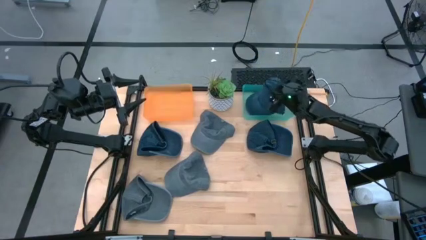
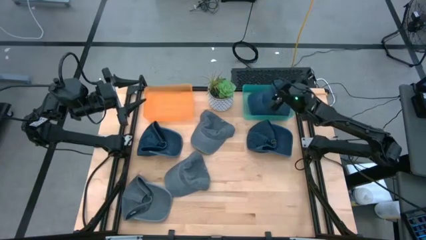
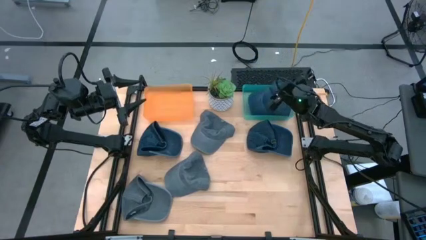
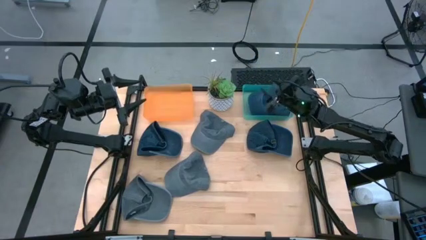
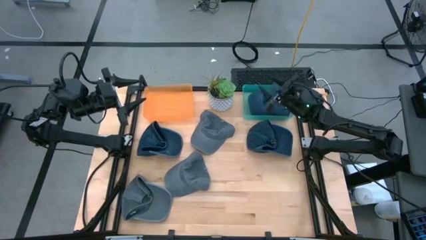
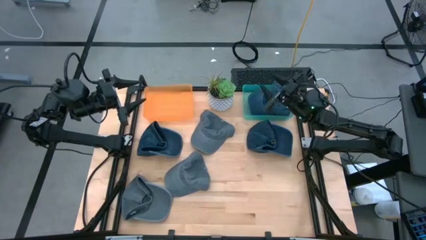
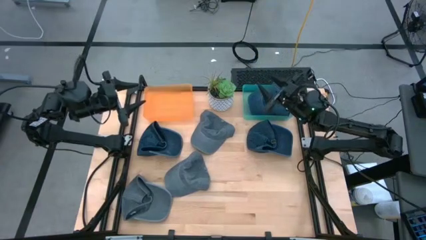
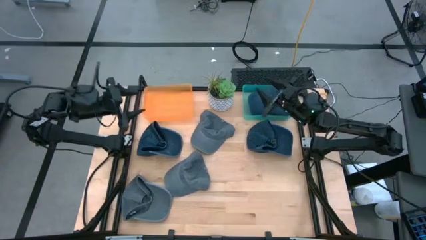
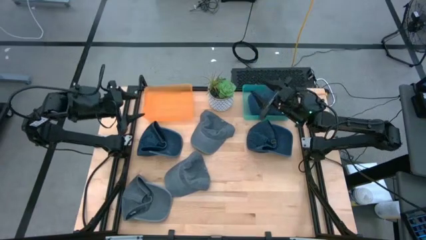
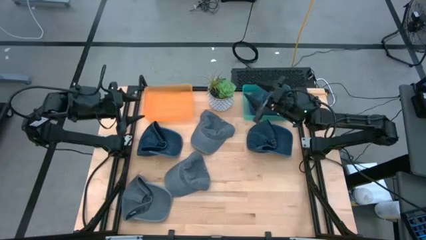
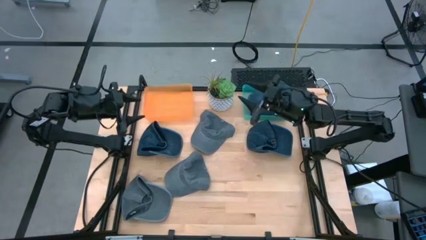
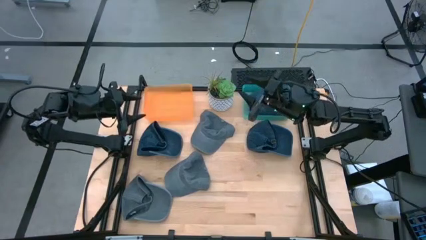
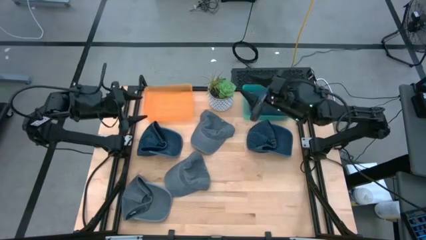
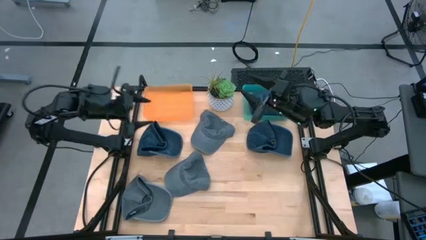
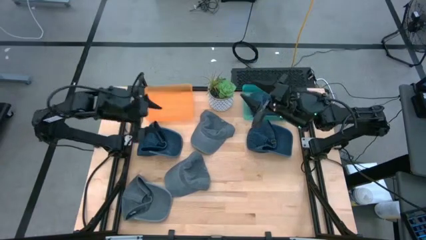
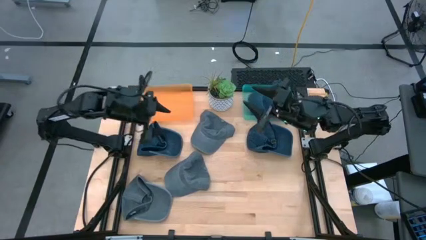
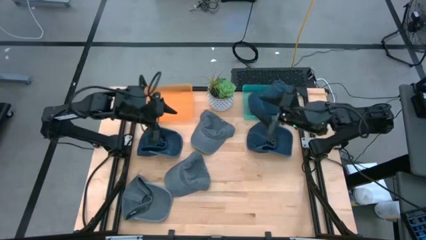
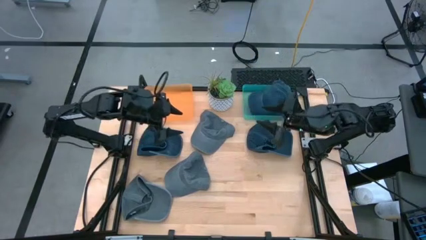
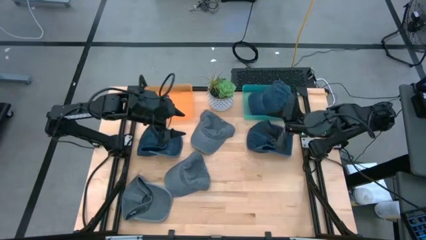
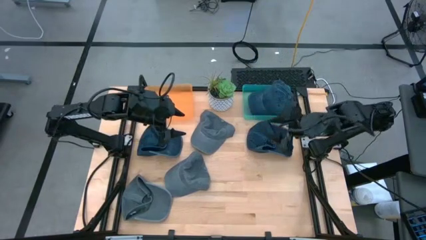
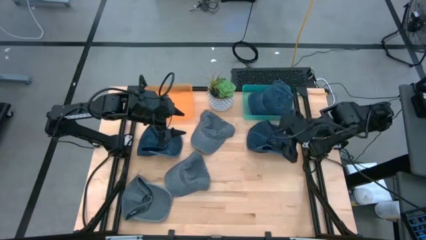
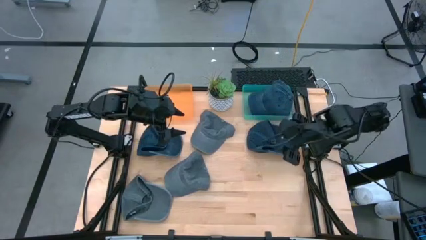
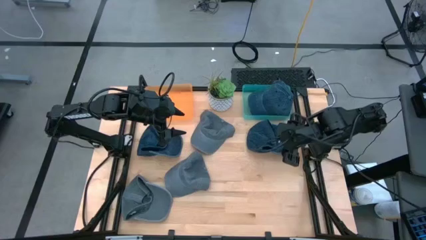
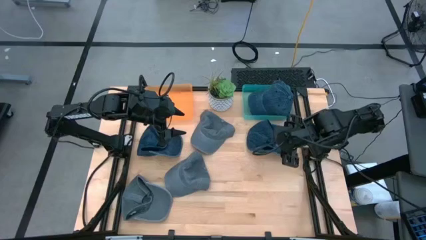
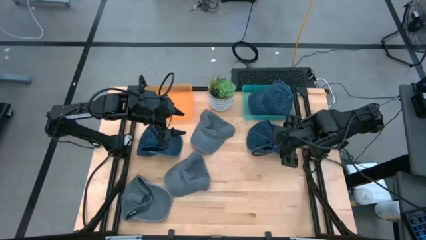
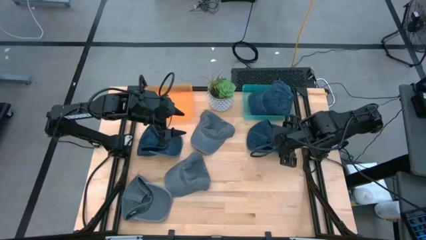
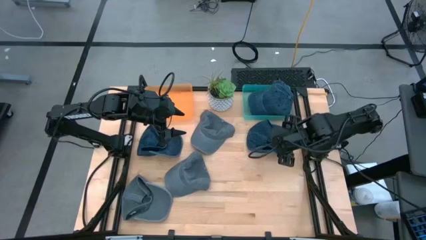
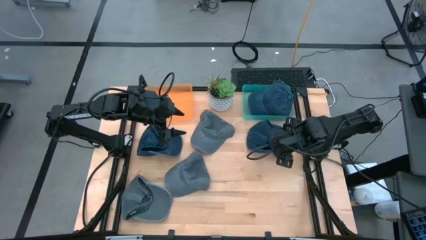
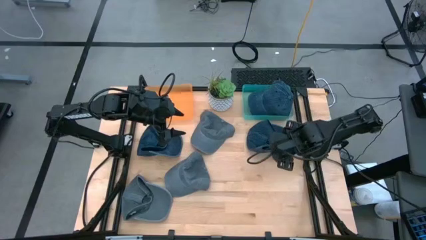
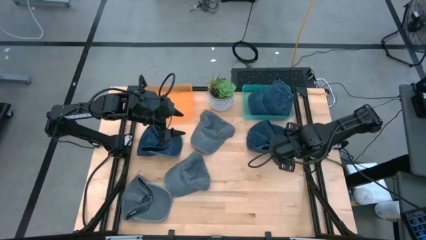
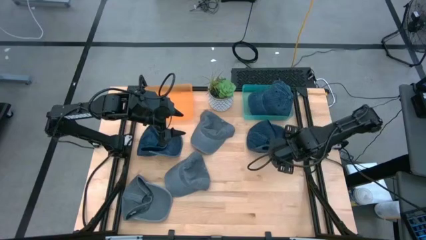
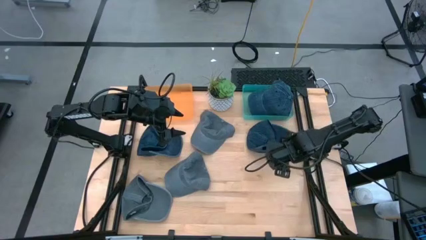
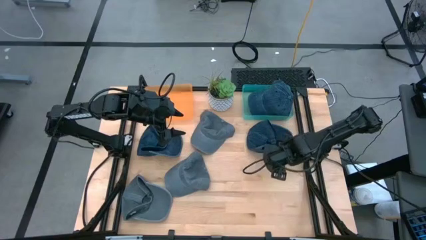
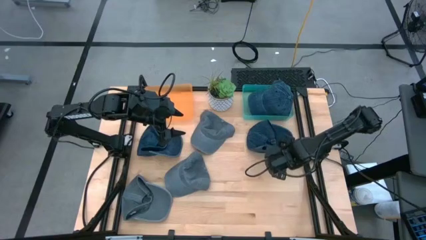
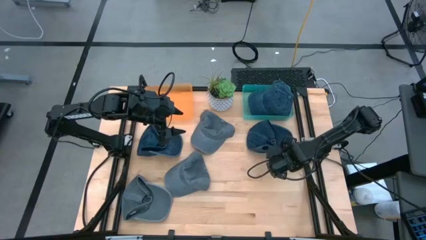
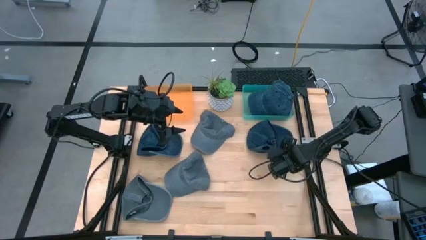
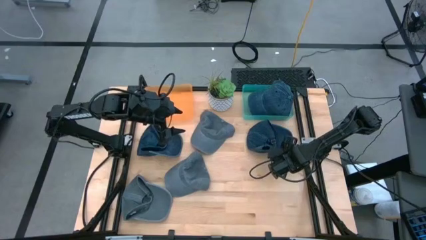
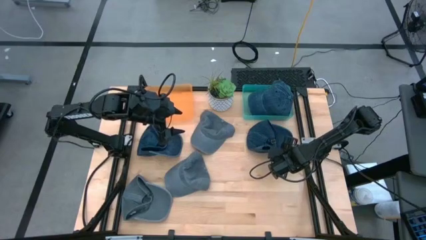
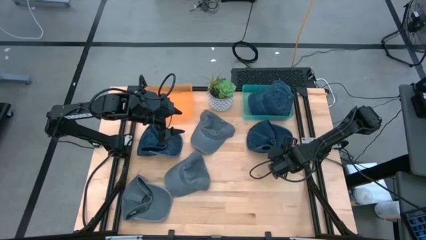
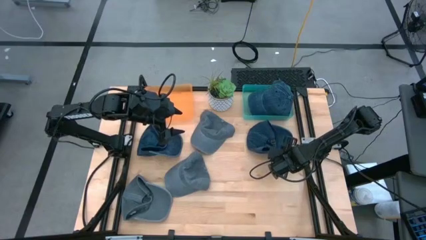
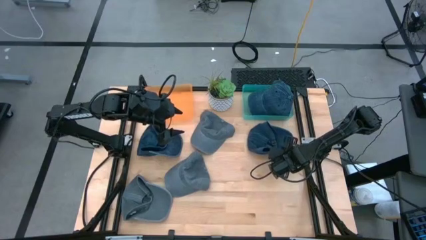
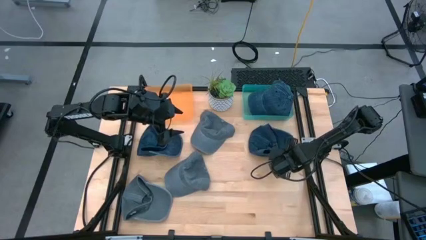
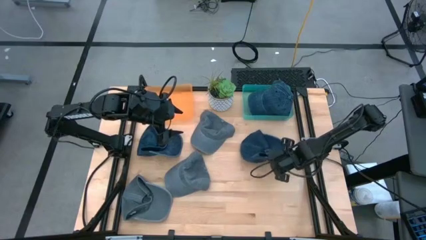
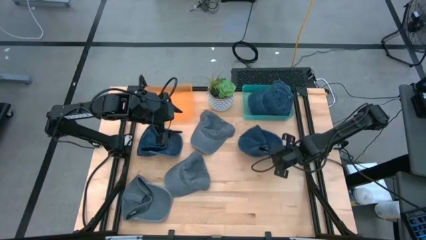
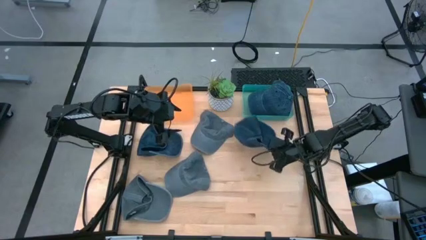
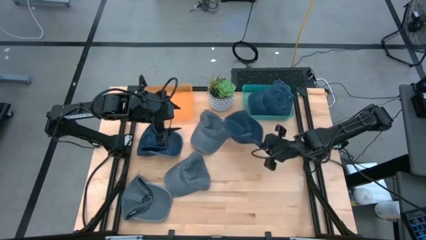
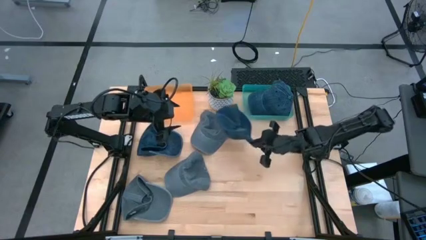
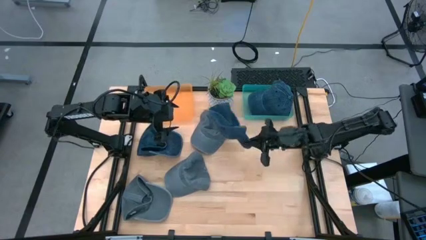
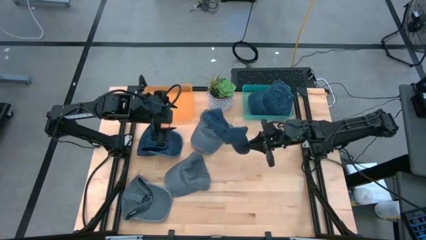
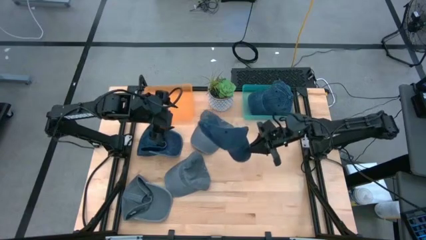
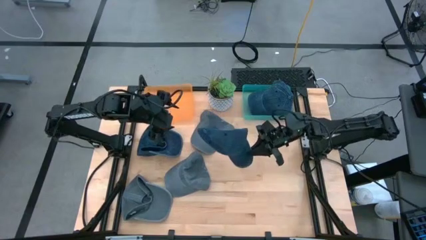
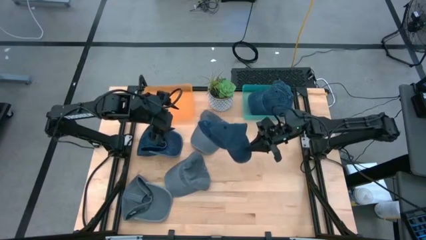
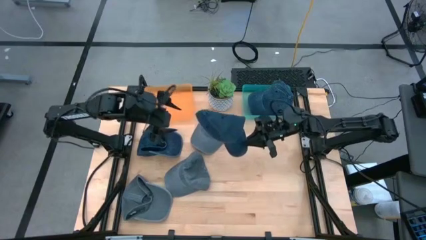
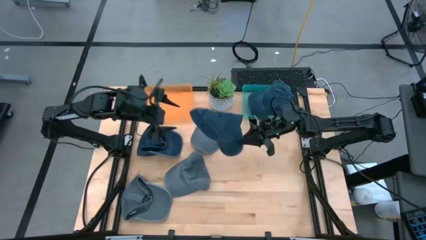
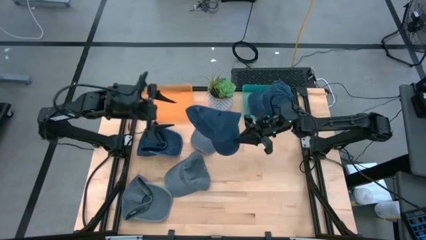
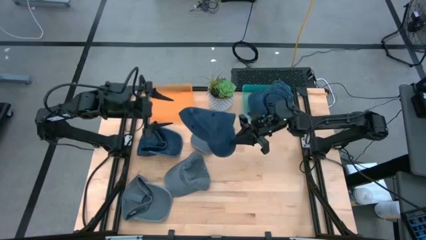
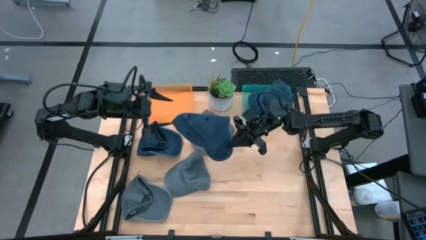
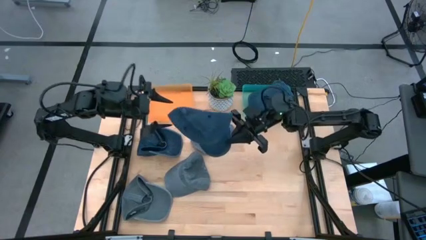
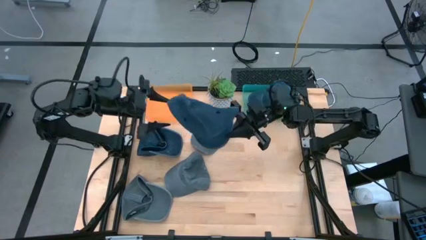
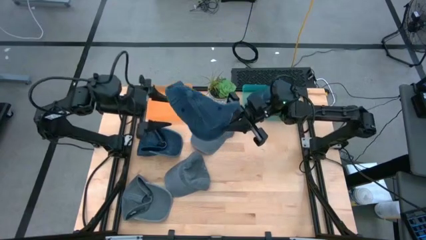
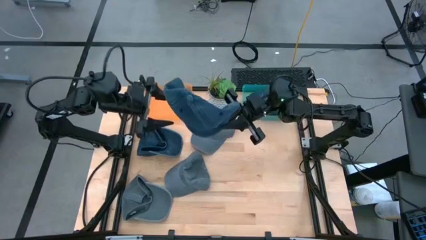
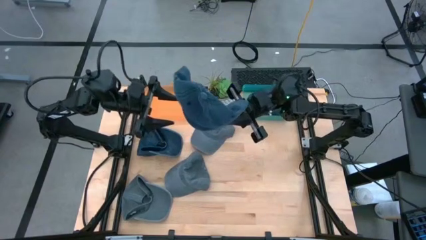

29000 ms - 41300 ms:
Task: Pick & Place hat
Put the right blue cap into the light blue bin
